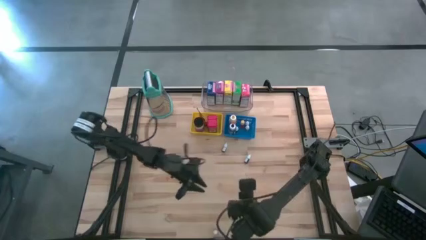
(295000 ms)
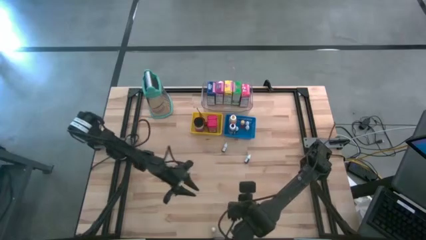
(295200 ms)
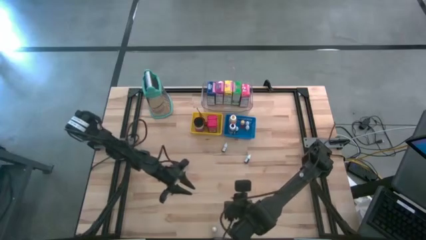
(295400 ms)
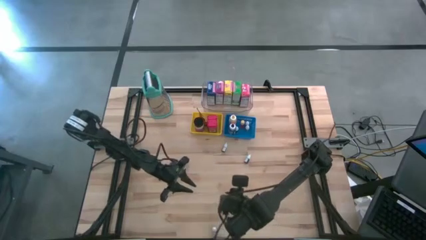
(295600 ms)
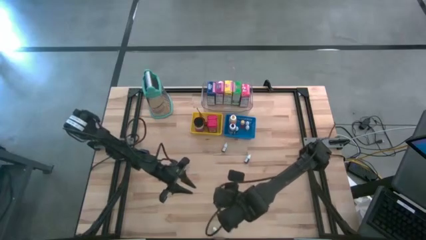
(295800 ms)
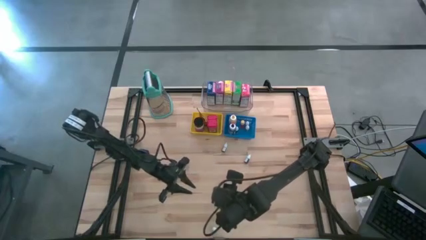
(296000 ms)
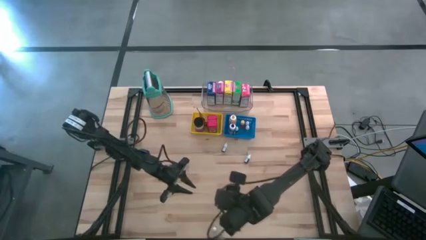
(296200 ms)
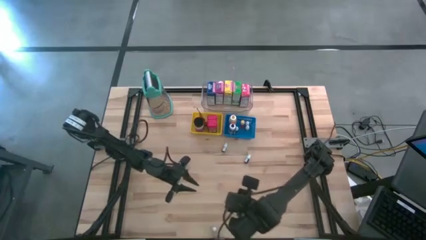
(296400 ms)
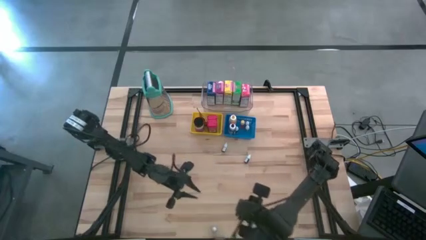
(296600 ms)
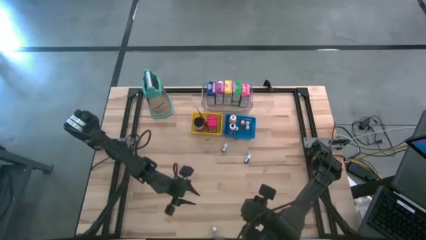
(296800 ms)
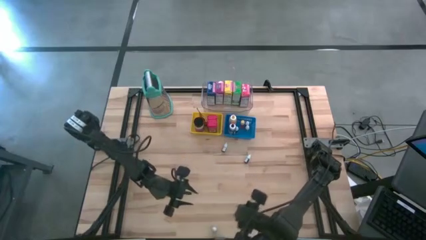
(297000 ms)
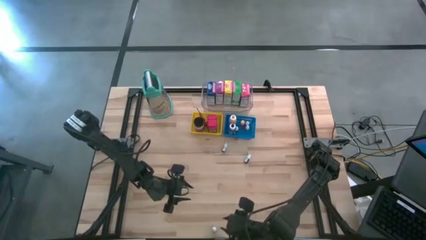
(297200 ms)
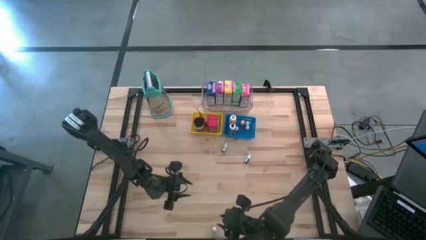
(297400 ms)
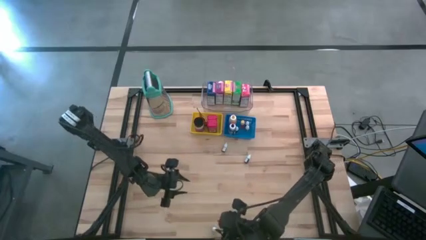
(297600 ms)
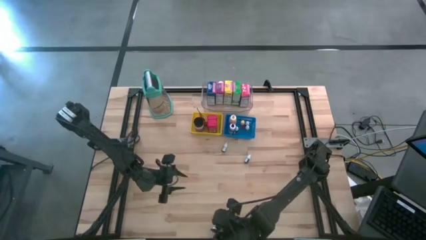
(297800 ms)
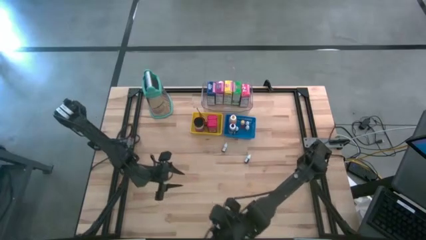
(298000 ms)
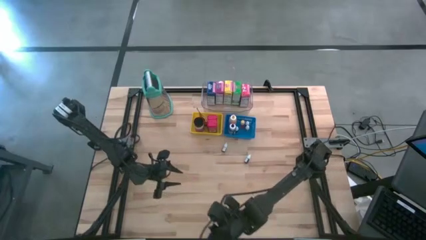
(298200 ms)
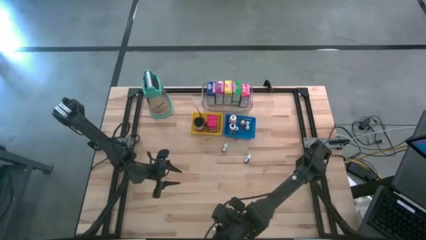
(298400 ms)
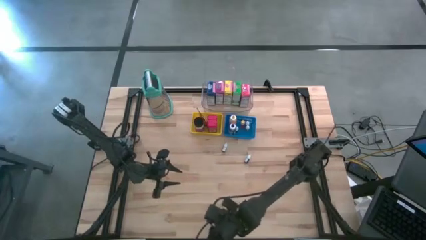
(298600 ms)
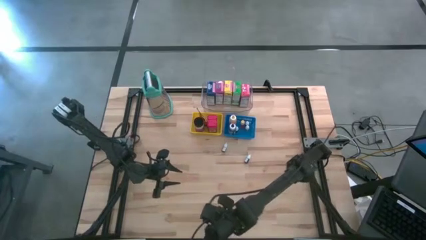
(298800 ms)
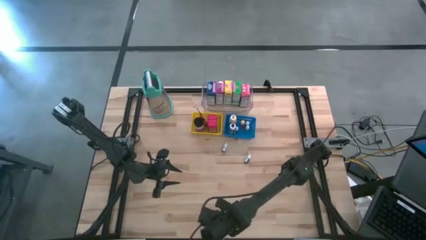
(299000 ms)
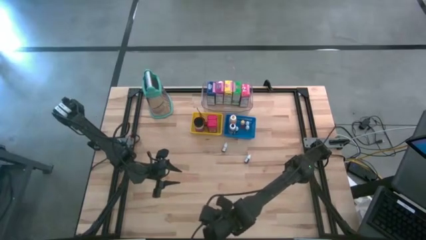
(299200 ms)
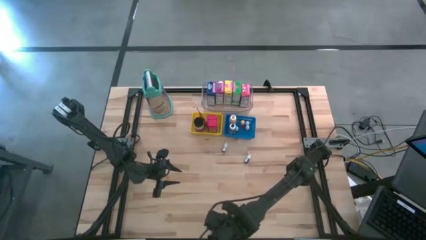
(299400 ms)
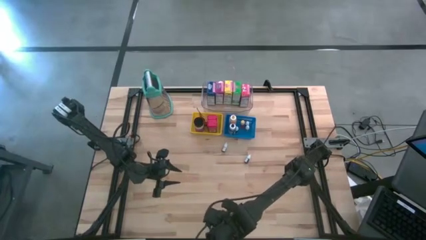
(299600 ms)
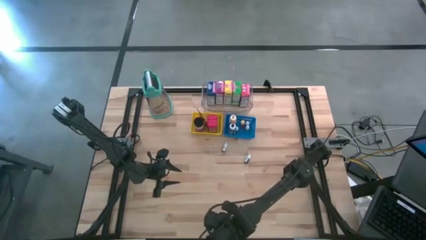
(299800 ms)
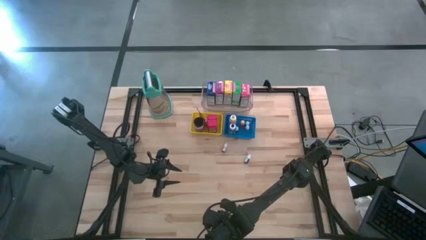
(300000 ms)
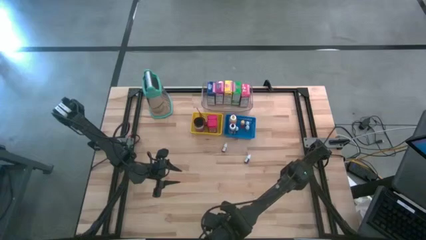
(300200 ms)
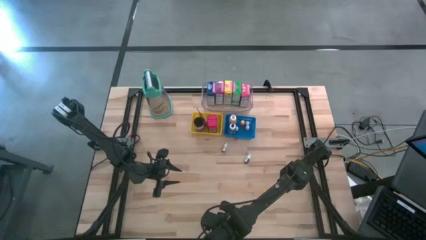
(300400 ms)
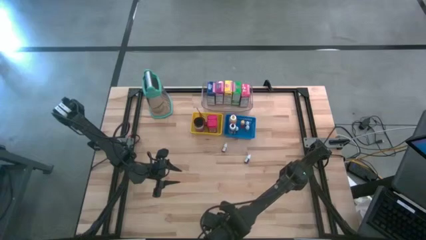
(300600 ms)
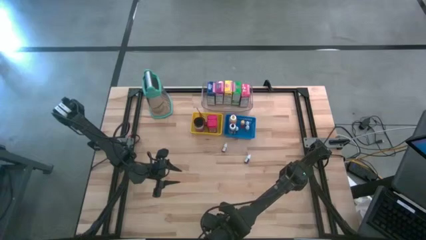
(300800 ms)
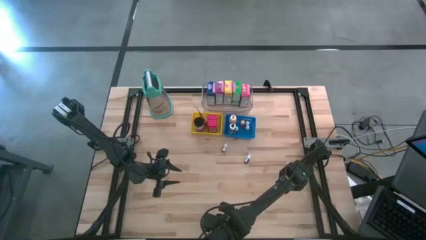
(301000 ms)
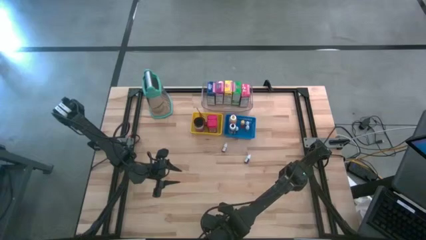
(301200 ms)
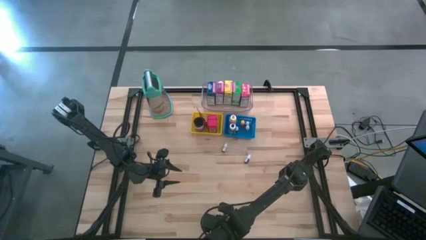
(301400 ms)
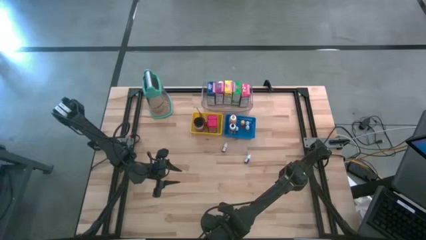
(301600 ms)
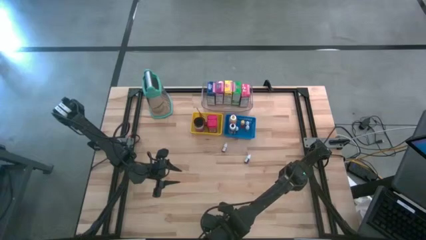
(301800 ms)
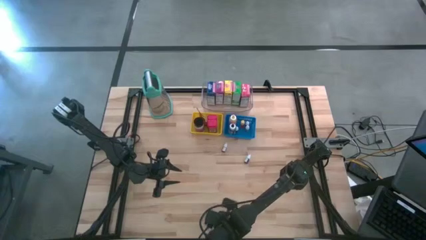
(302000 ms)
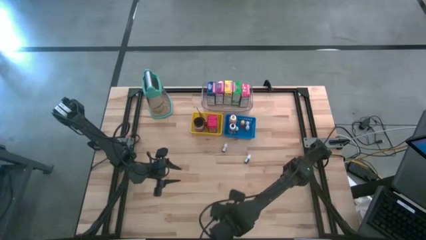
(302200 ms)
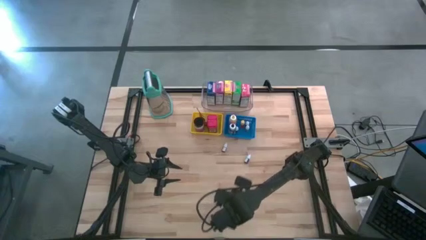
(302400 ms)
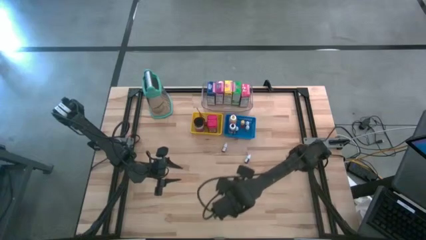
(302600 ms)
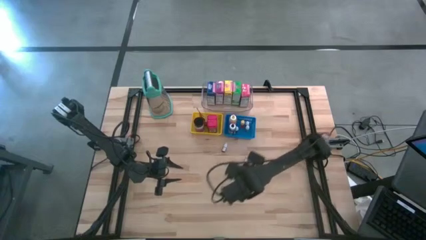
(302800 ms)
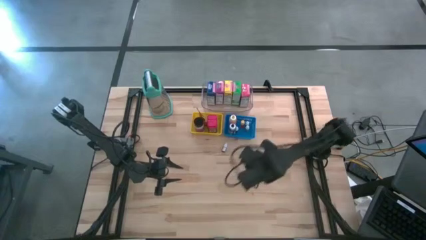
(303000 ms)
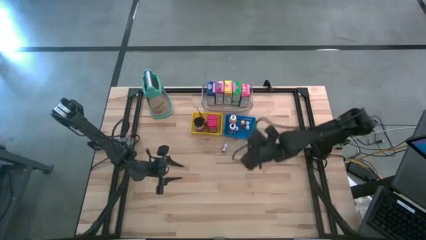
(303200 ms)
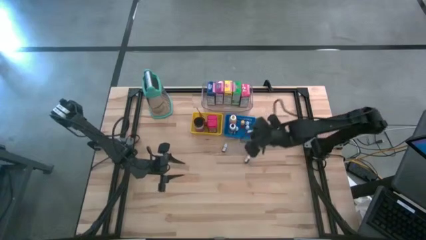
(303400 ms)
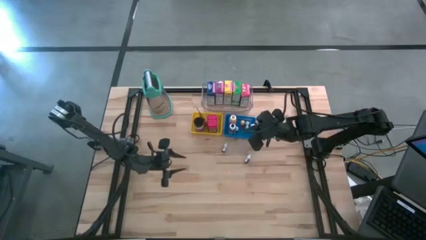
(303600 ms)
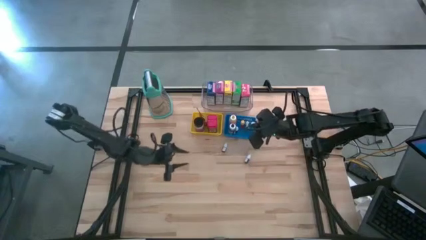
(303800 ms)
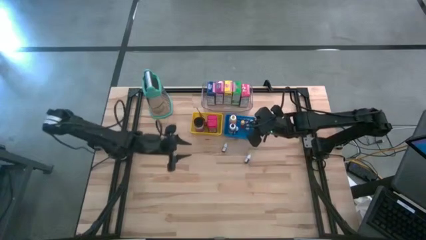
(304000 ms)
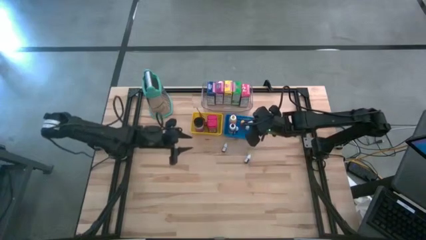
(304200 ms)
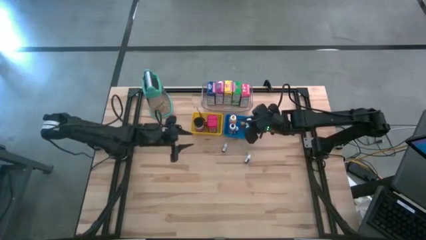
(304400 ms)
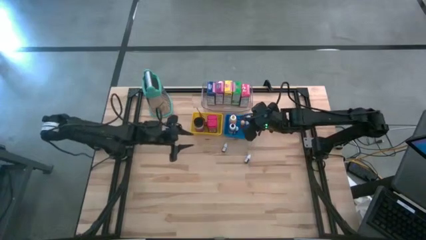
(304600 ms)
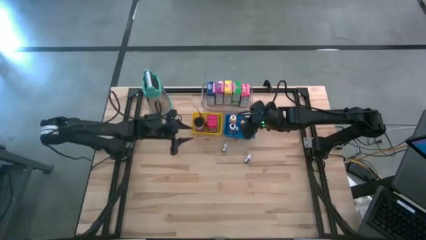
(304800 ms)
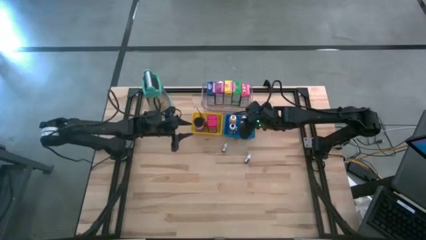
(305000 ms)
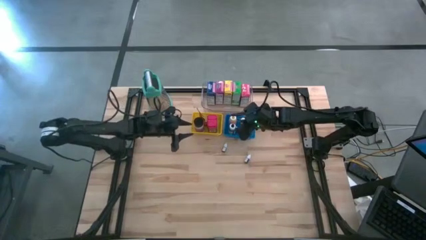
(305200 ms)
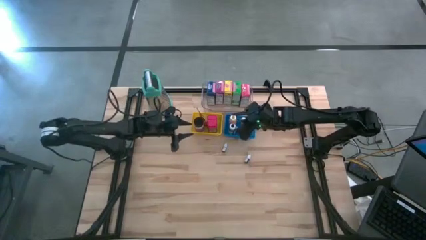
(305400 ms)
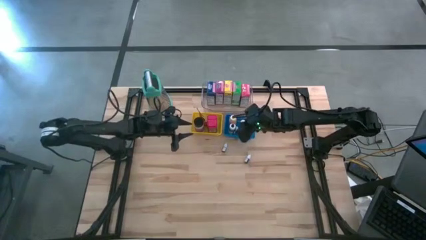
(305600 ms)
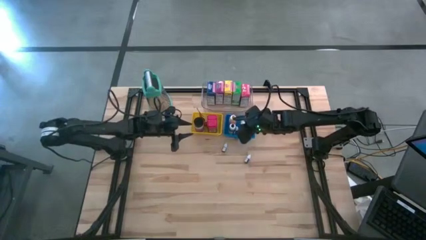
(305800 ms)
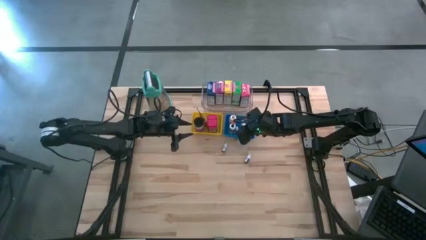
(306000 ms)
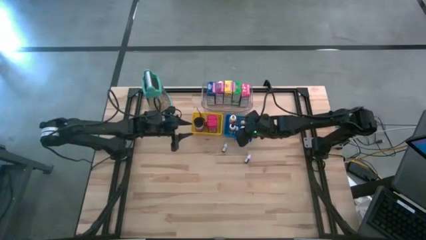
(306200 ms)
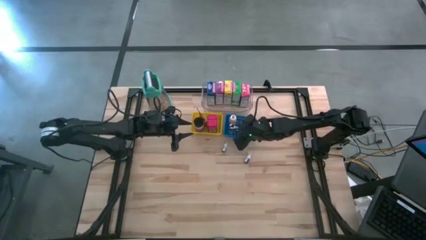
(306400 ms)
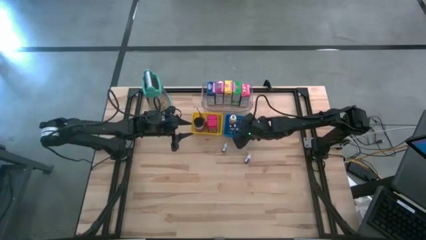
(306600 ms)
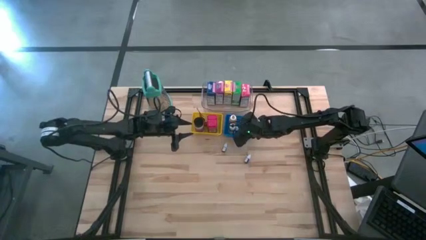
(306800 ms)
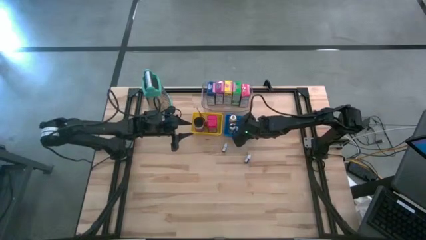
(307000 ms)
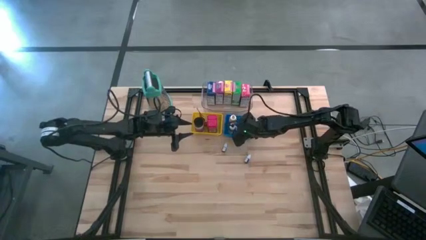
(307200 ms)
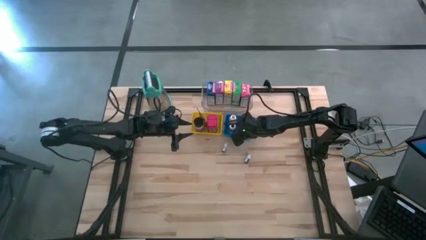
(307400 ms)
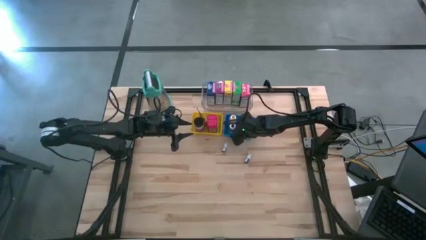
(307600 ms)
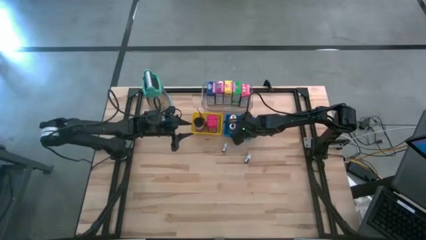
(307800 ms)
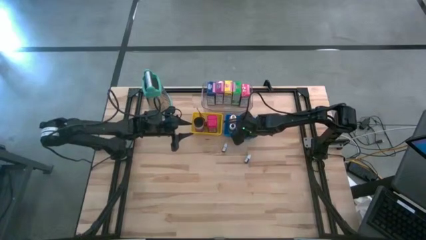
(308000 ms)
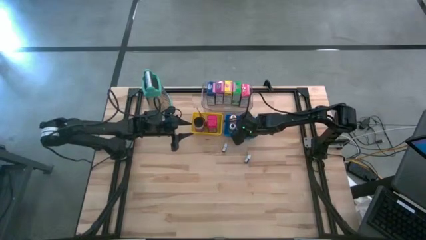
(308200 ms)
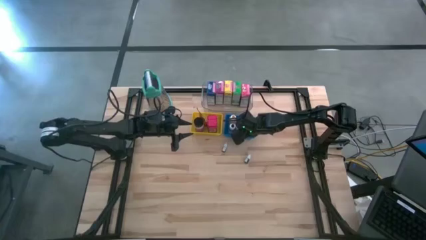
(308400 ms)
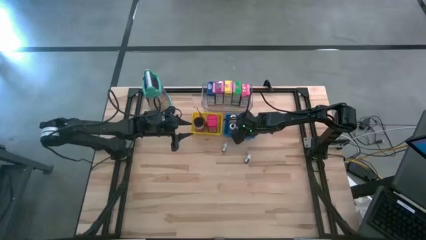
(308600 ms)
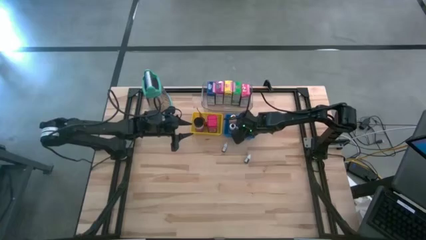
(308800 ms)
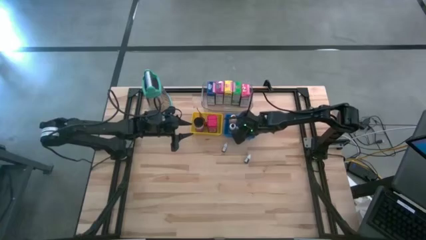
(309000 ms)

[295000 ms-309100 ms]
Task: Pick & Place Kitchen Items
Put the small black food coloring bottle into the blue bin

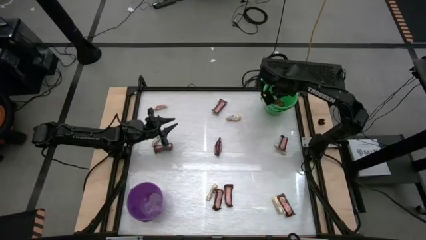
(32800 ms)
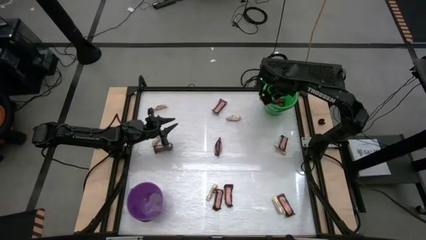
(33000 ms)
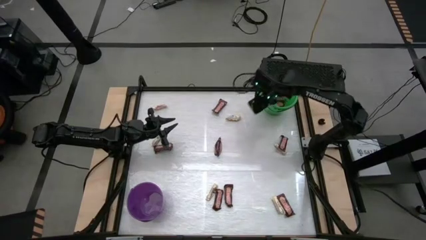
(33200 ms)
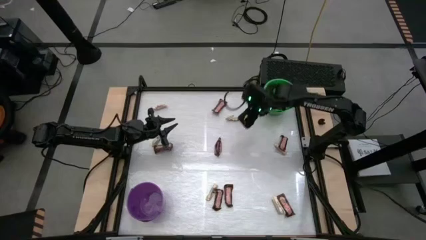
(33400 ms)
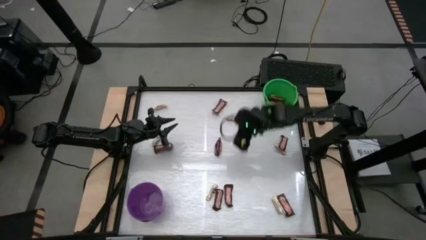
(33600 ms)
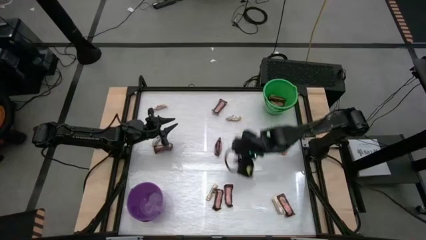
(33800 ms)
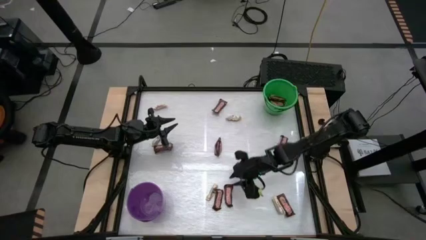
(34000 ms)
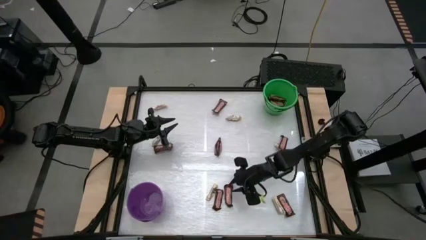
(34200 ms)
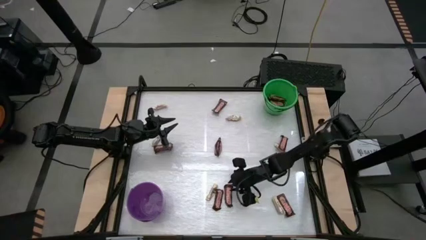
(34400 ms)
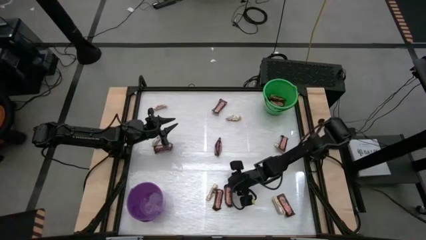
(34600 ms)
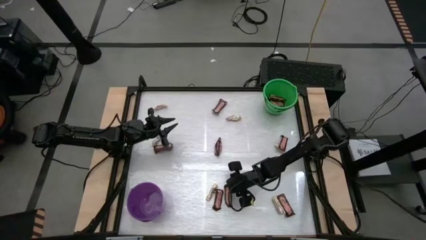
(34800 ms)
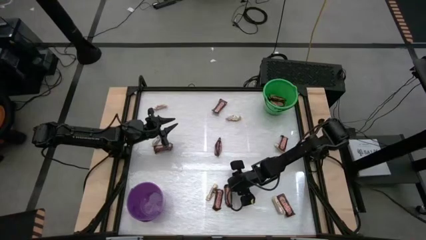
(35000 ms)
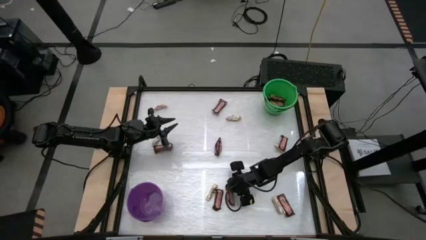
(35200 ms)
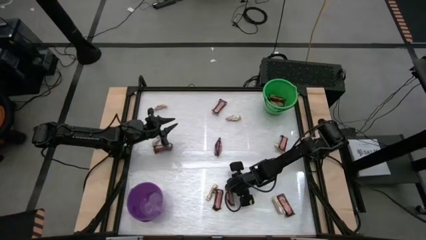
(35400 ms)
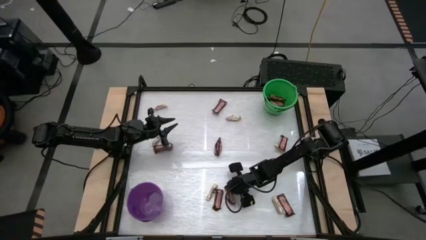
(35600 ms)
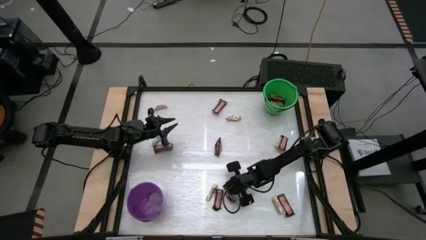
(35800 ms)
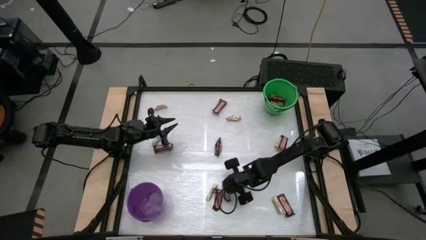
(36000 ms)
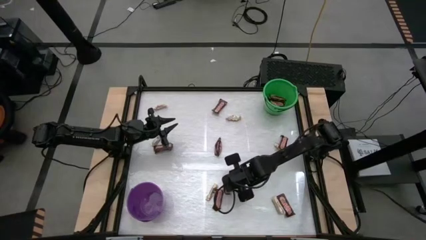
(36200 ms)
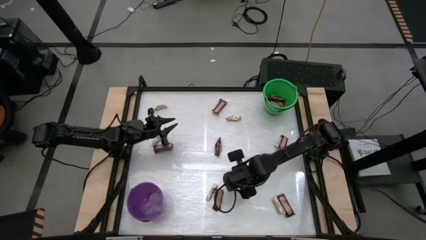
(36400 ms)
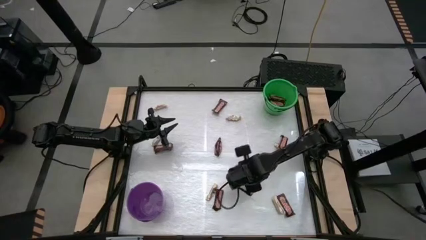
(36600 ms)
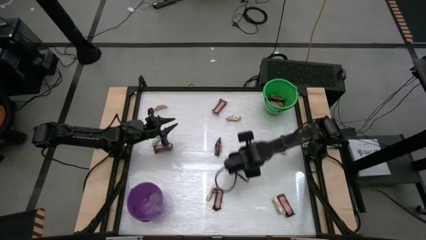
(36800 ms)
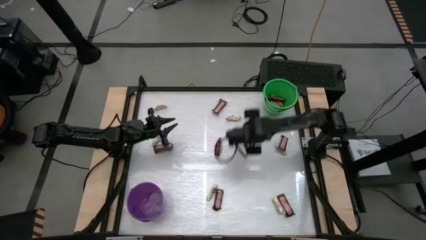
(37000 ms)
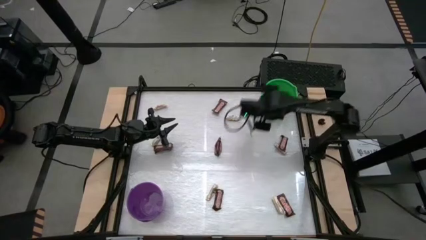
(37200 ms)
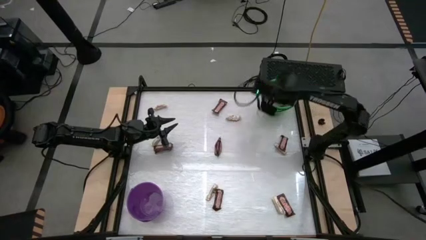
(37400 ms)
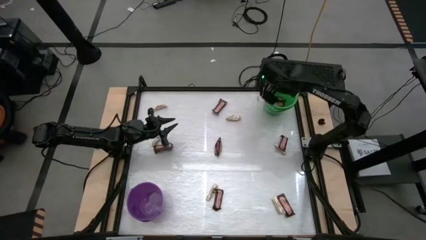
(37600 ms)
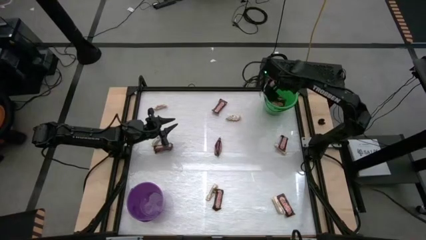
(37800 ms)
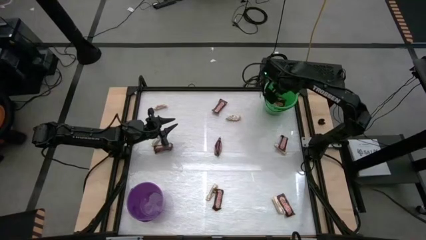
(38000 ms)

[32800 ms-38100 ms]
Task: Sort candy by brand, put in halloween buckets
Put the brown candy bar into the green bucket
